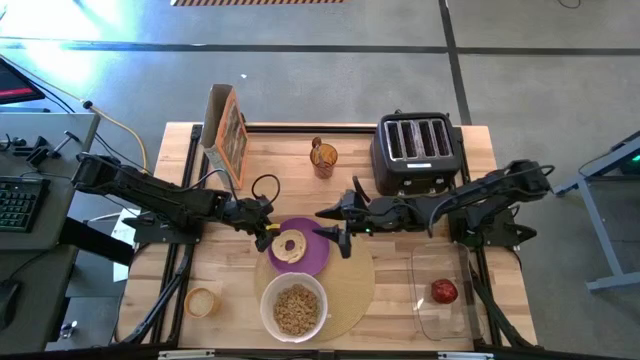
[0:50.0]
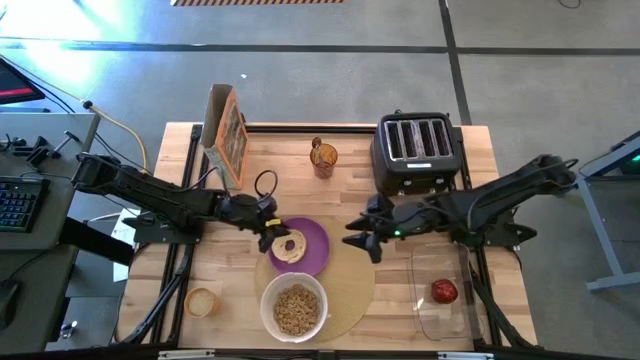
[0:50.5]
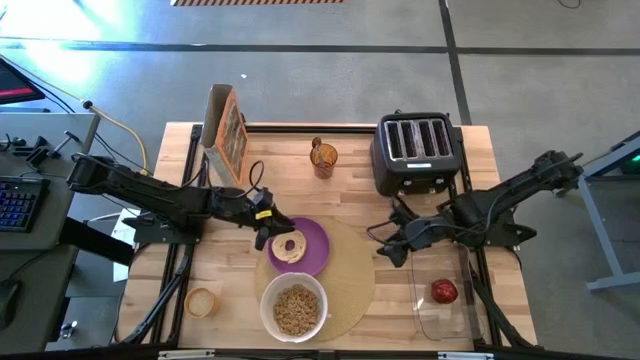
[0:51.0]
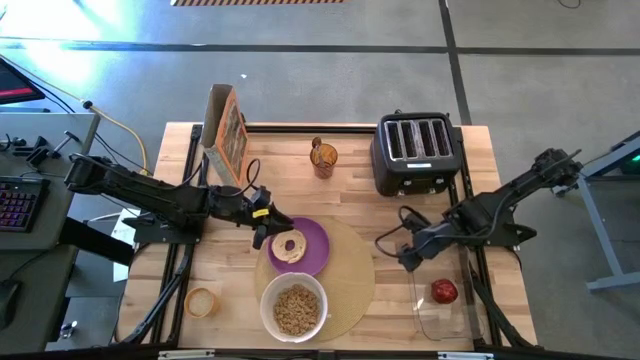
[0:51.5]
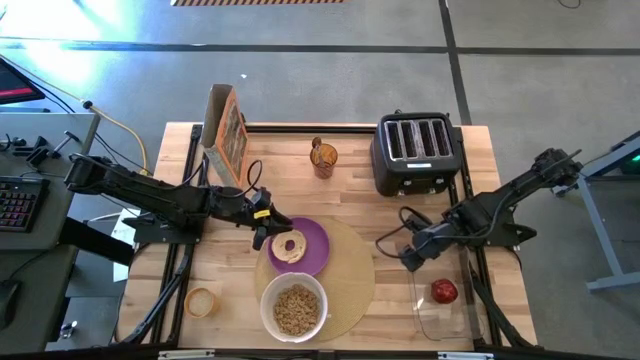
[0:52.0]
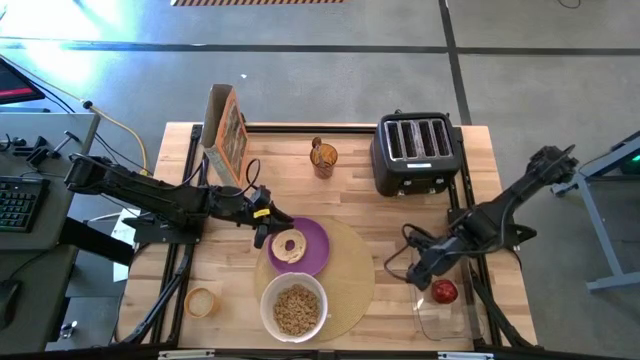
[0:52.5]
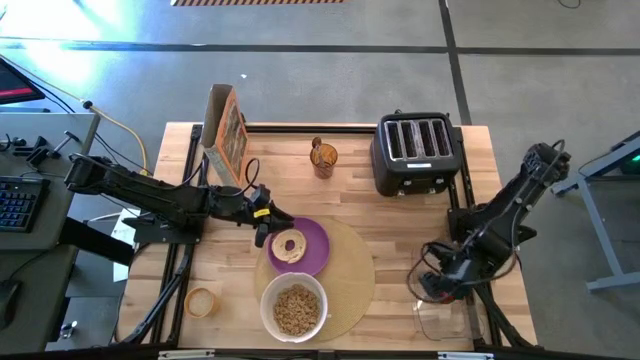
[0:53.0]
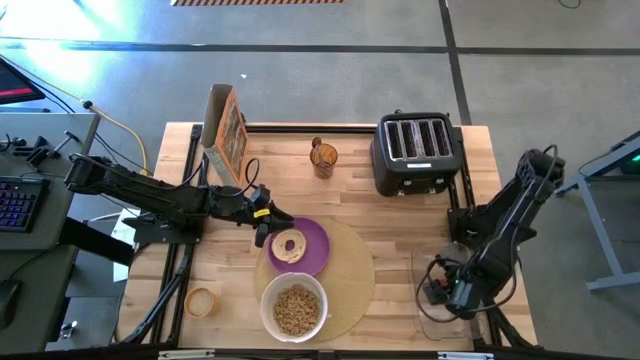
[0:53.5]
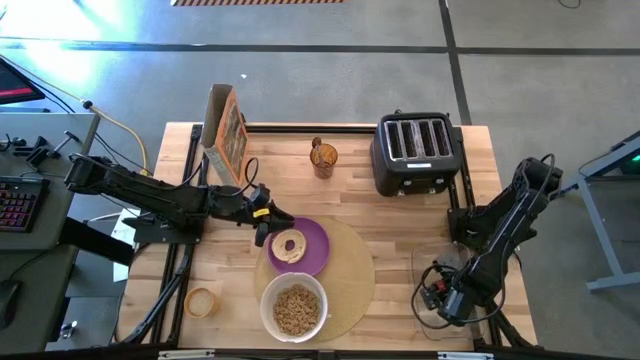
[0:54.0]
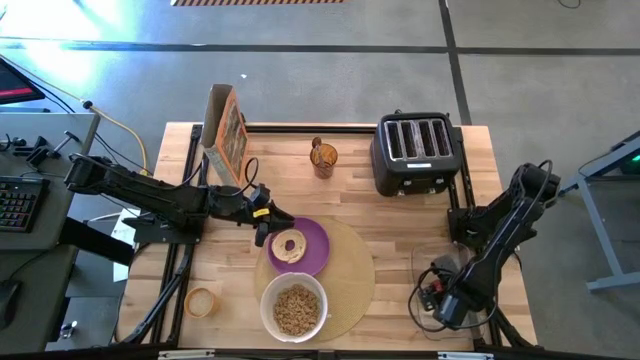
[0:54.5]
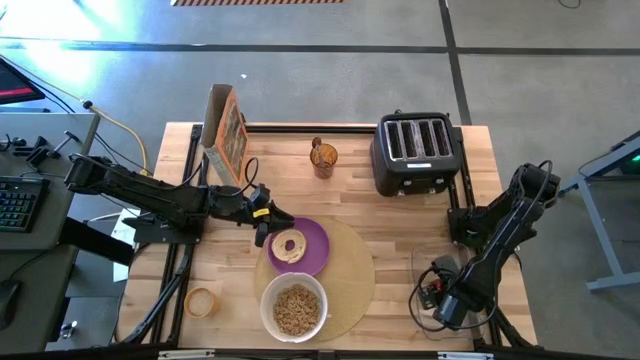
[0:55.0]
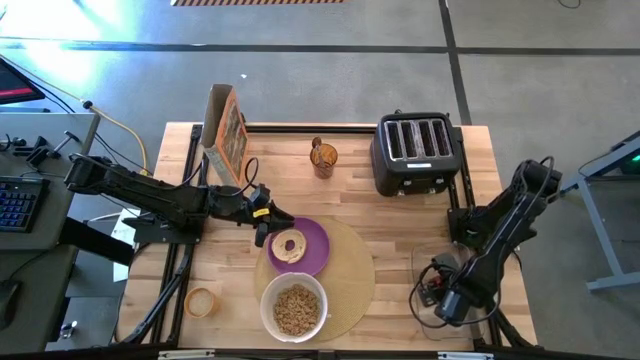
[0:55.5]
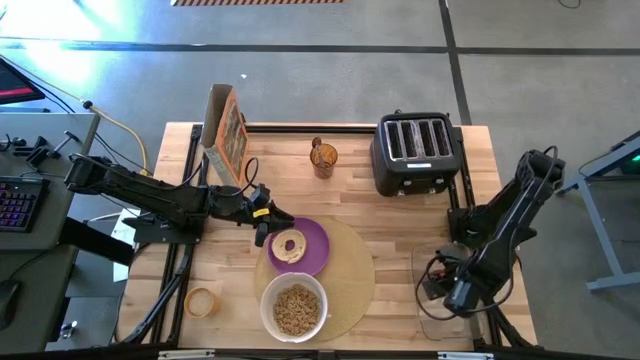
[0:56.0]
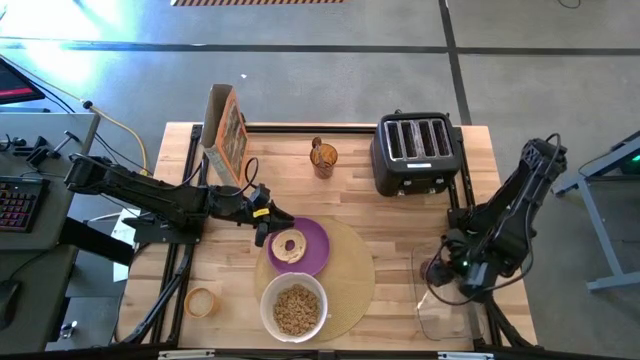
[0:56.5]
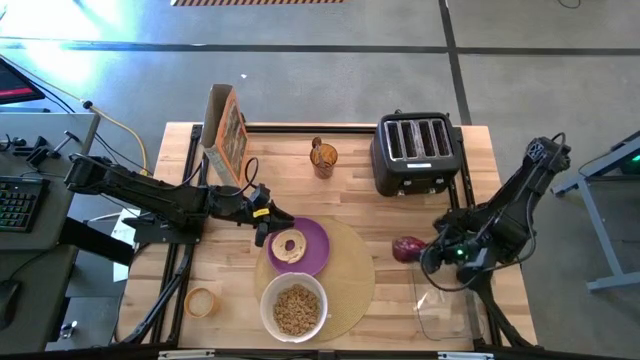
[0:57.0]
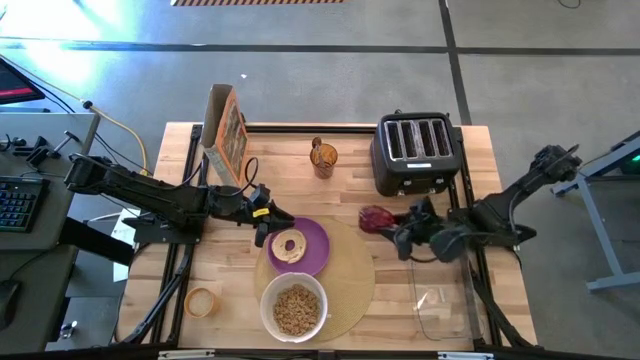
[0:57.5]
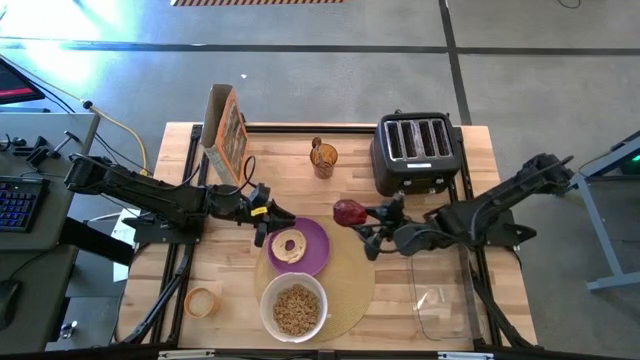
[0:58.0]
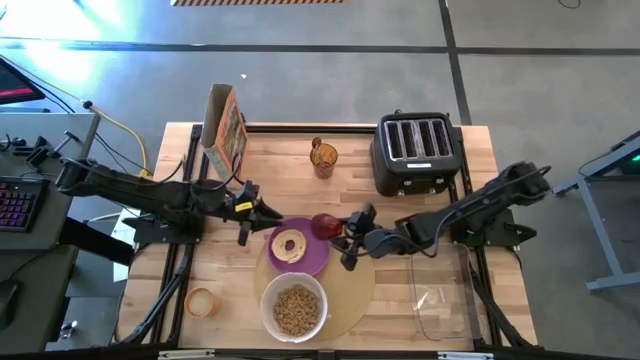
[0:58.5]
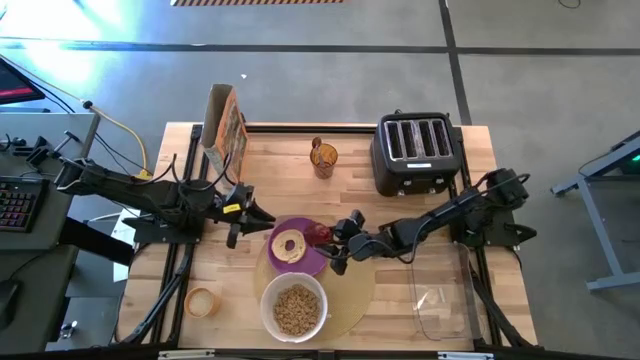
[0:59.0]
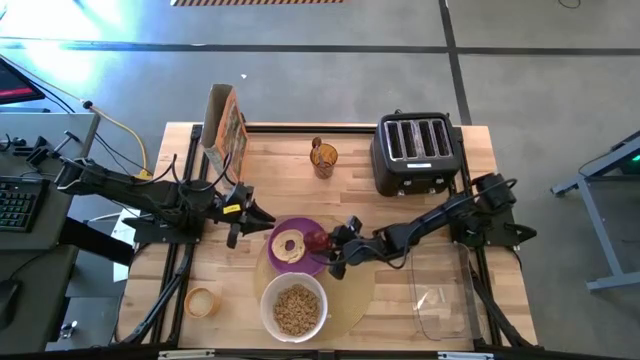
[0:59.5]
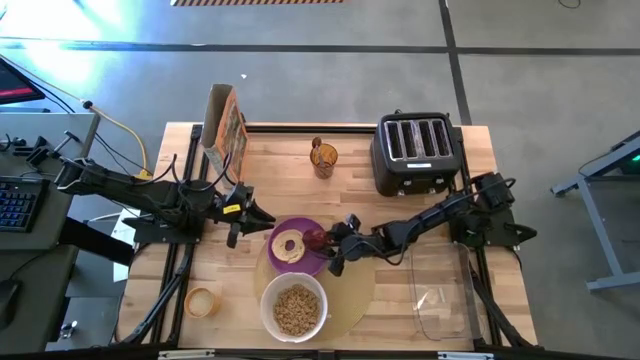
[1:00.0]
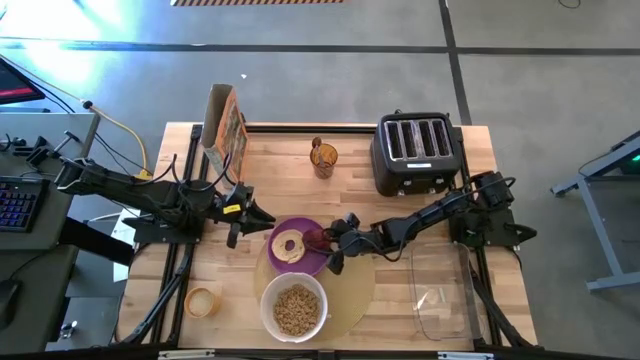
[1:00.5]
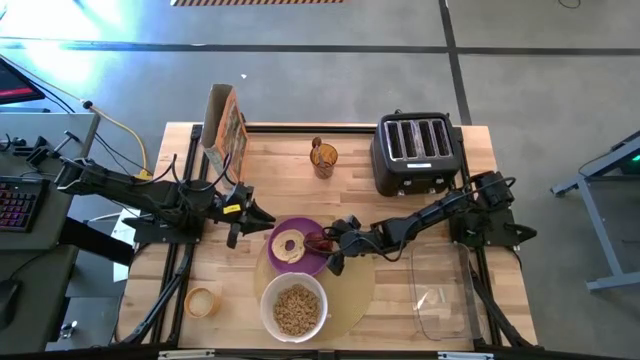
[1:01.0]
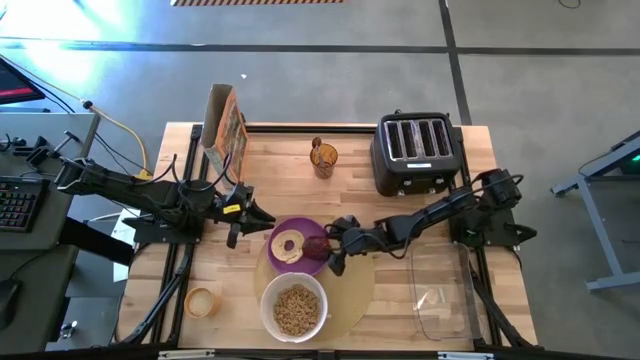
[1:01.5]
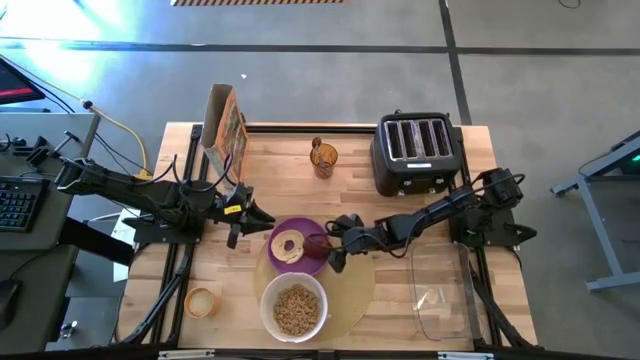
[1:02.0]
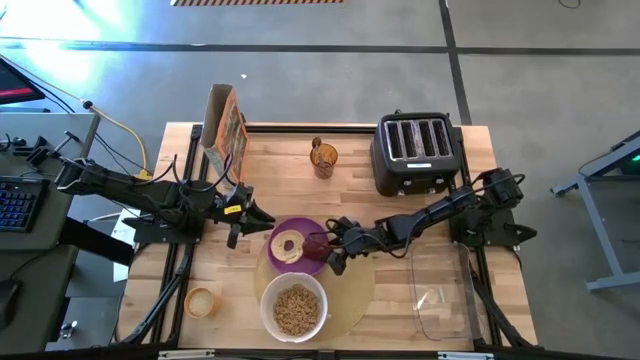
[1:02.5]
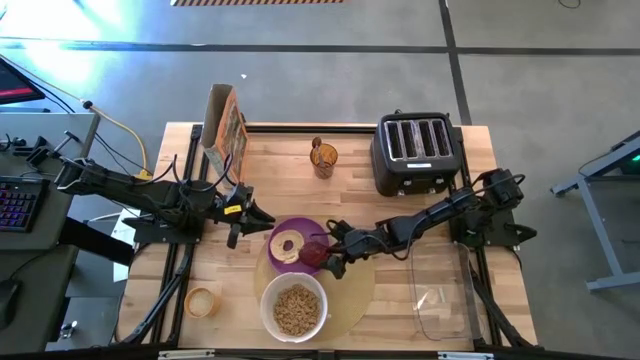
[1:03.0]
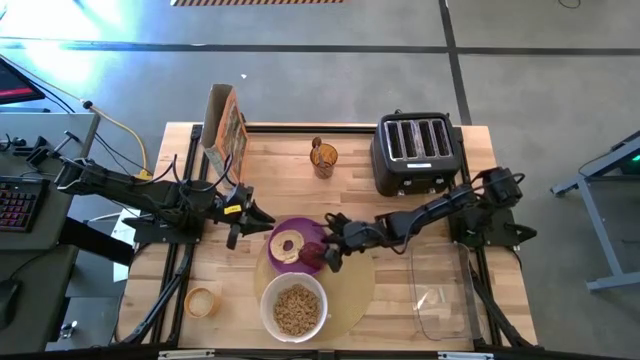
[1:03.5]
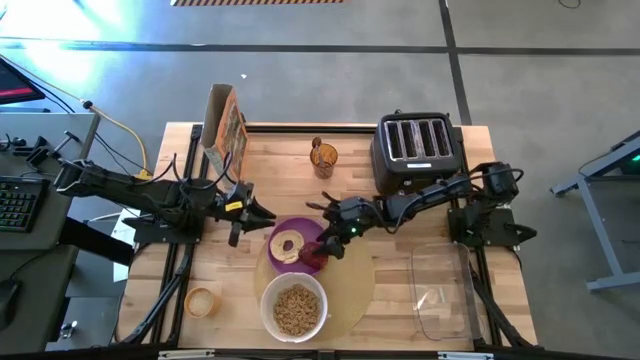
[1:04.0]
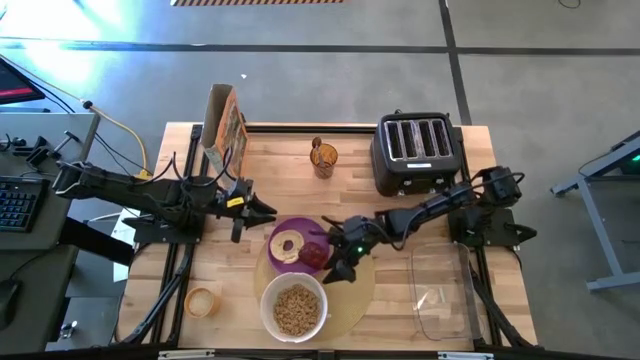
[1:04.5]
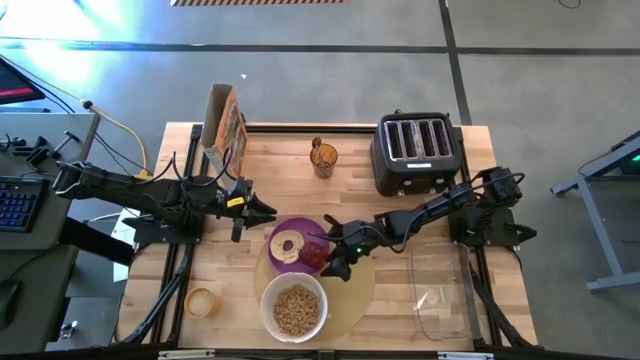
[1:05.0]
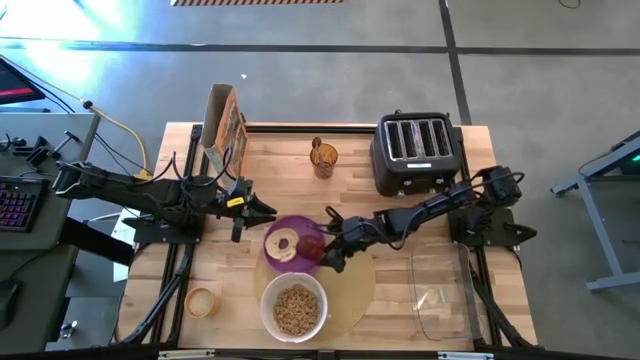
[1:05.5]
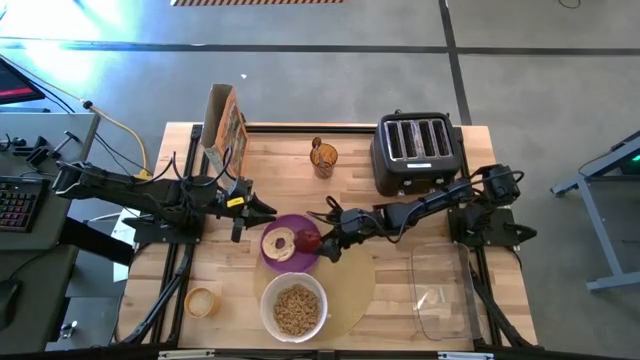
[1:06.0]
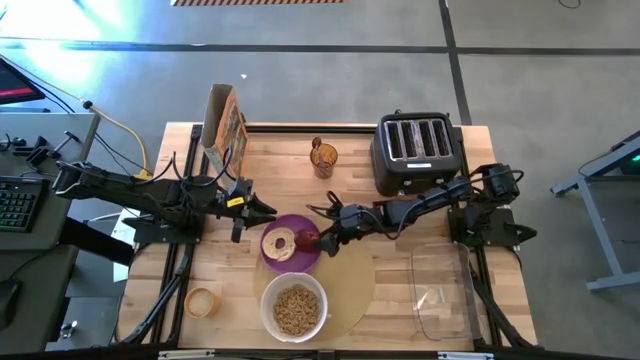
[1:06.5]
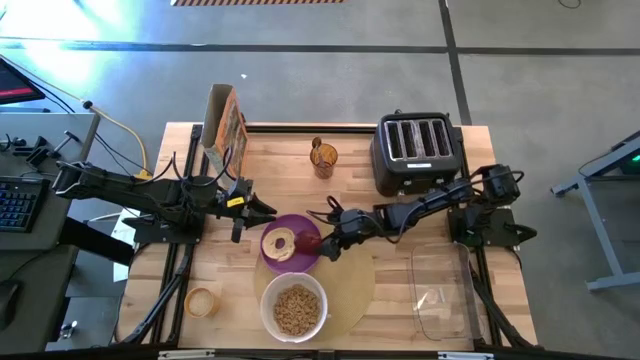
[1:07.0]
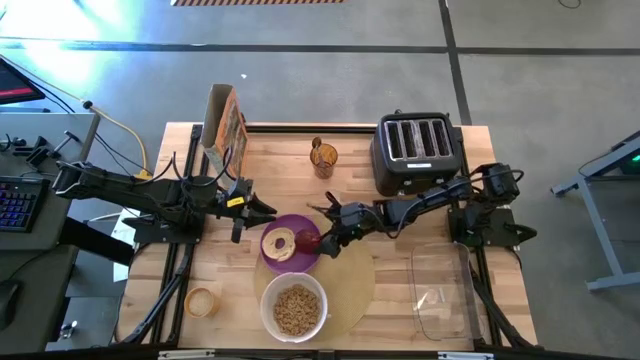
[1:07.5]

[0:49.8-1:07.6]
Task: Arrange a breakfast setting
Put the apple on the violet plate to the right of the bagel

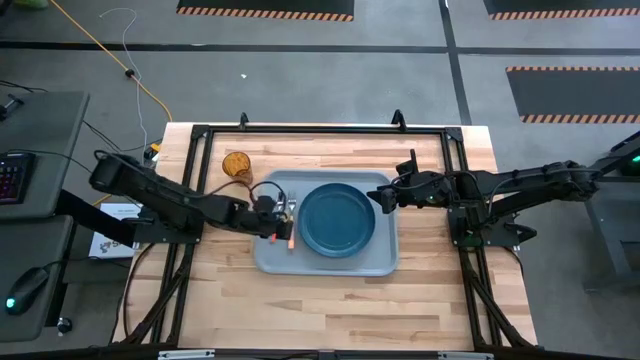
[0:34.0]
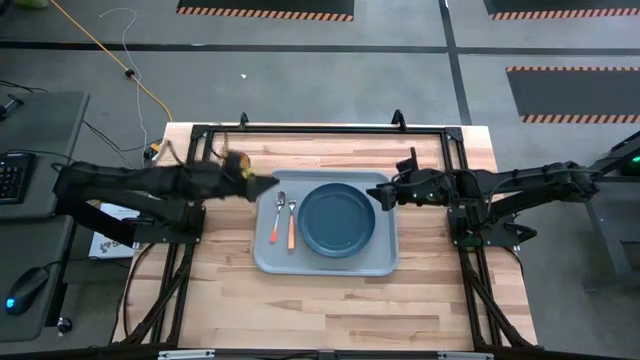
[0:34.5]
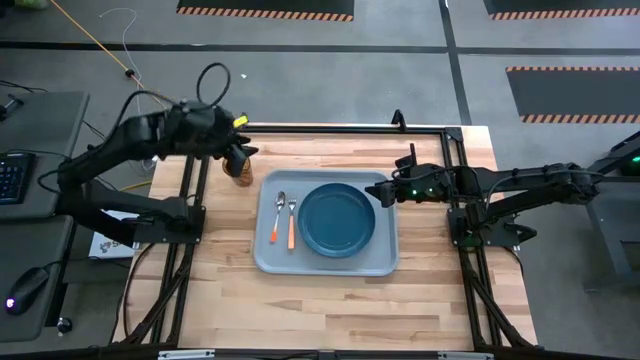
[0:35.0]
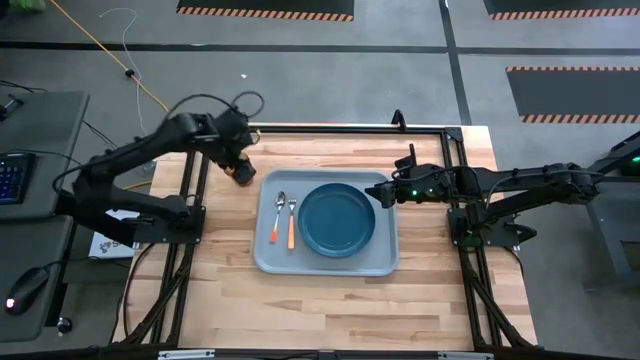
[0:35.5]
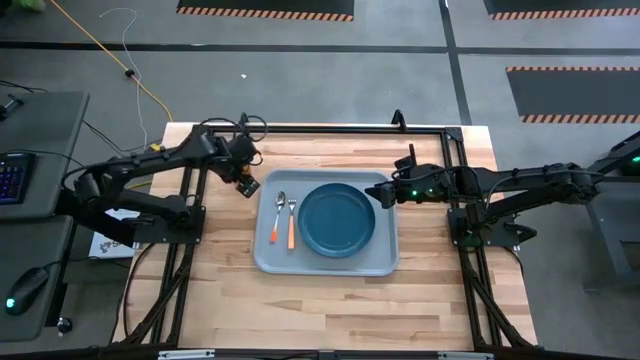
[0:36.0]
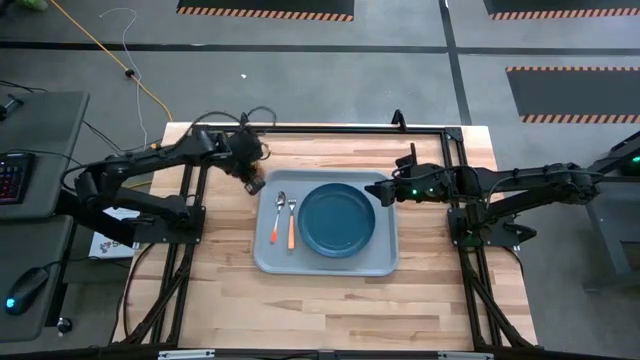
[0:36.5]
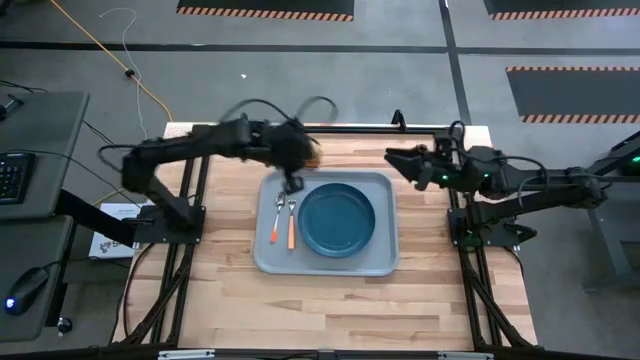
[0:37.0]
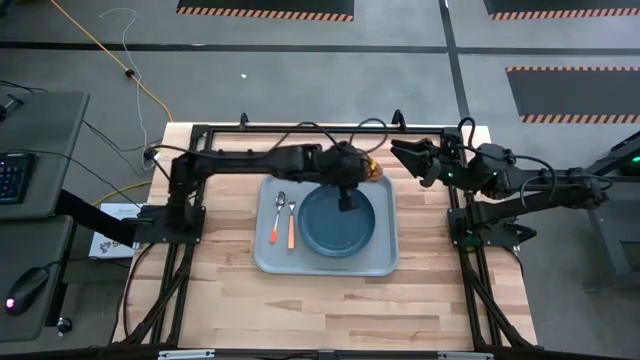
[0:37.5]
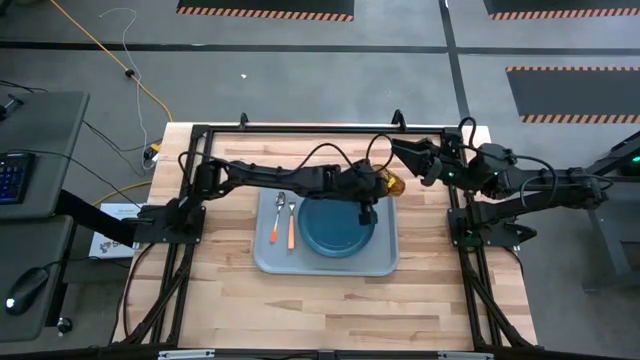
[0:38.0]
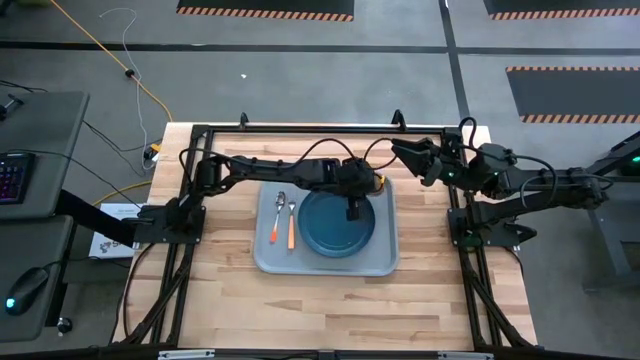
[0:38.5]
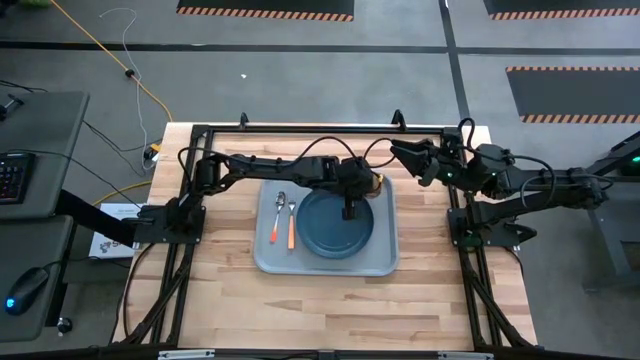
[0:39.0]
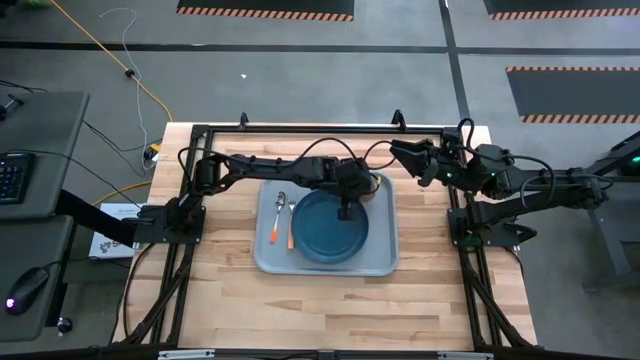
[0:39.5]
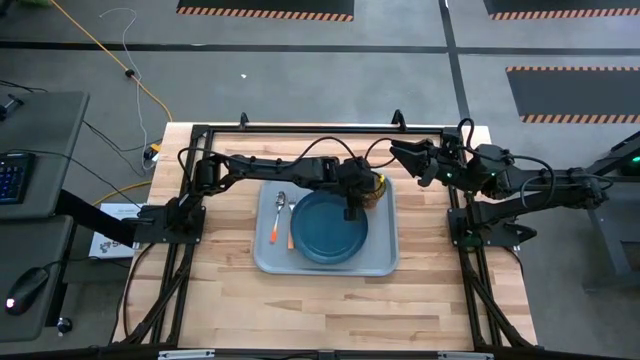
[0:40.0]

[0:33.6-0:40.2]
Task: Pick and place plate/cup/fork/spoon on tray
Put the yellow cup on the gray tray
